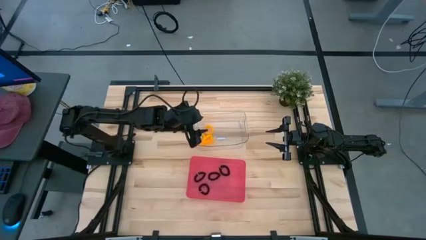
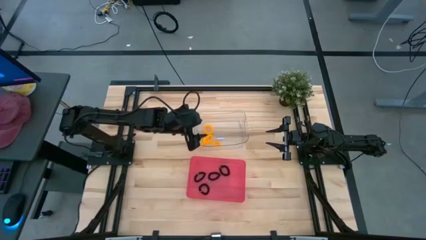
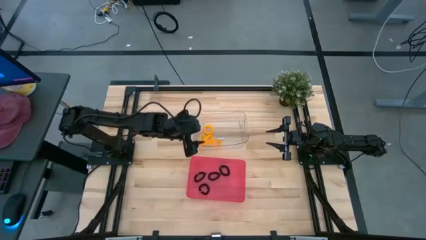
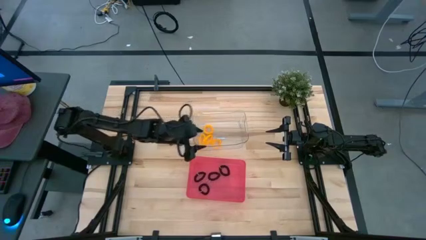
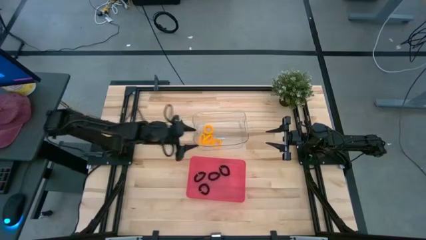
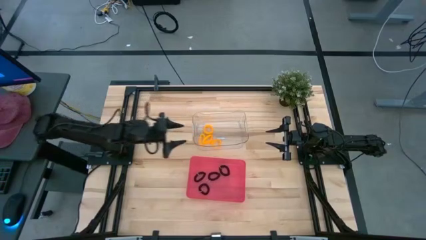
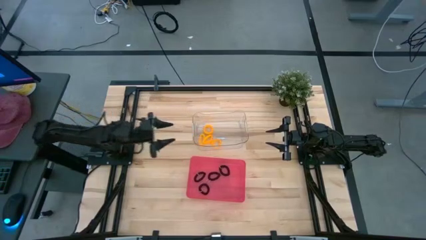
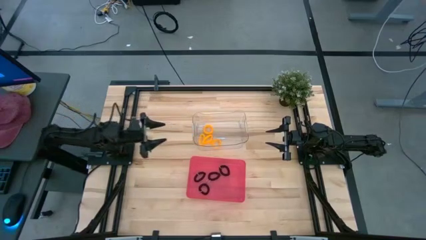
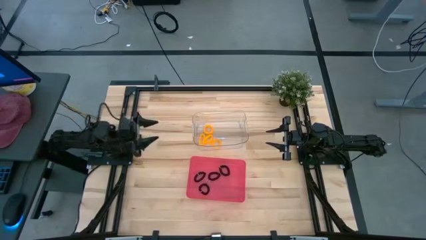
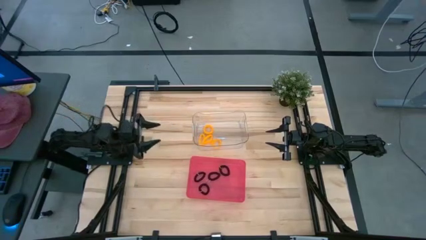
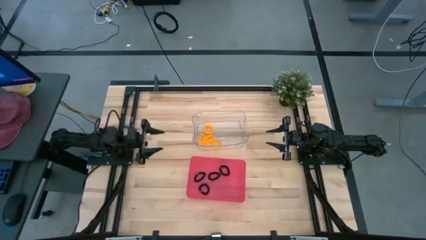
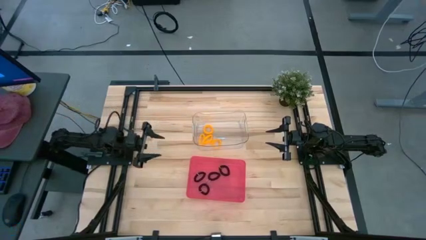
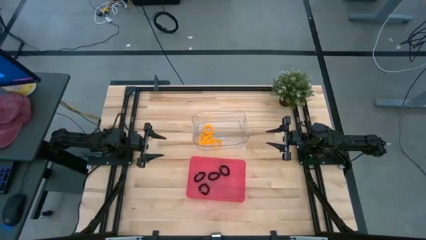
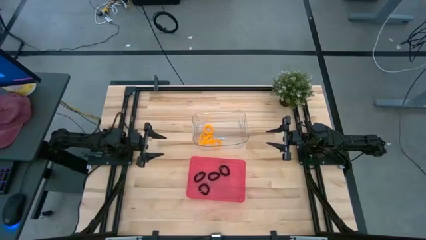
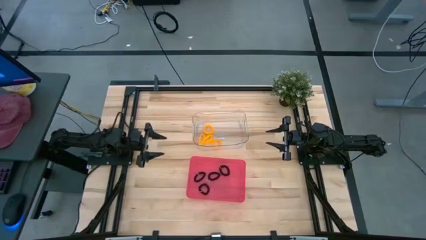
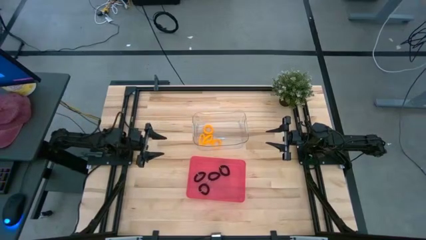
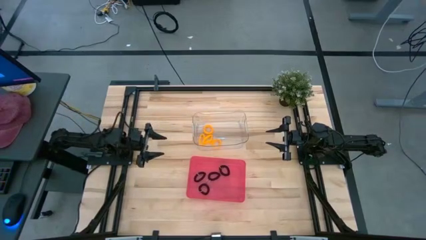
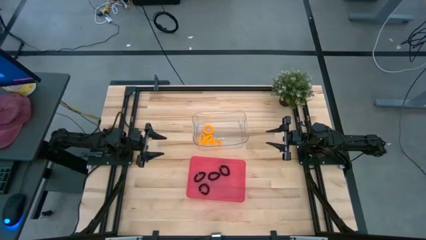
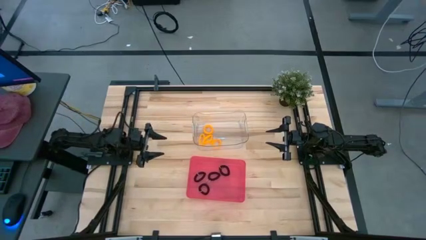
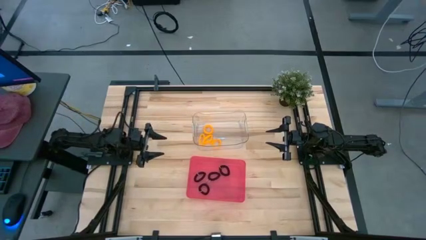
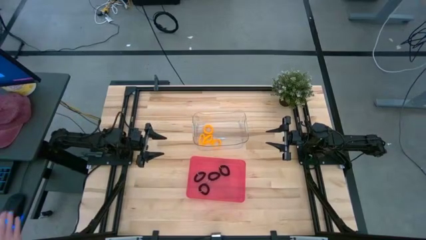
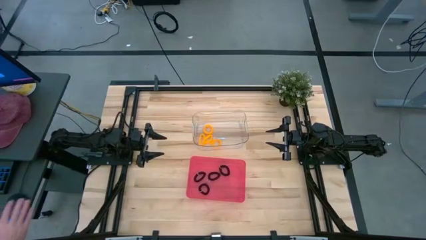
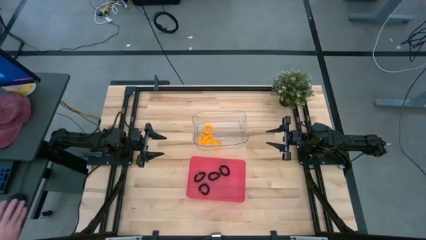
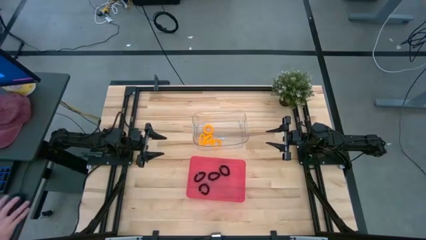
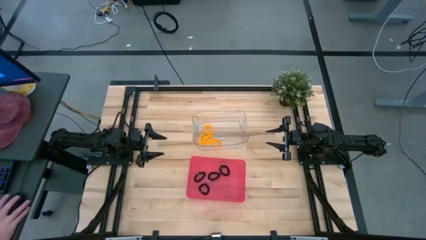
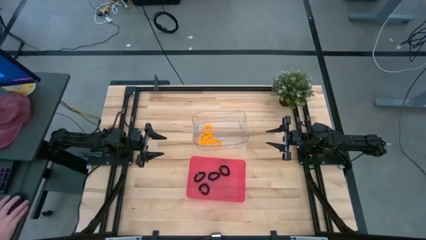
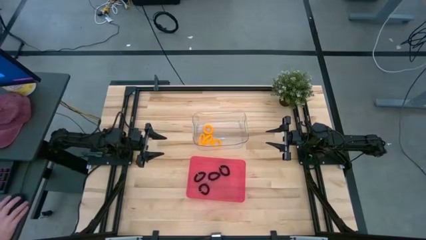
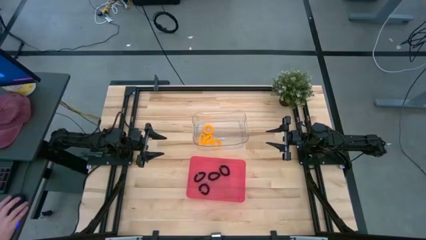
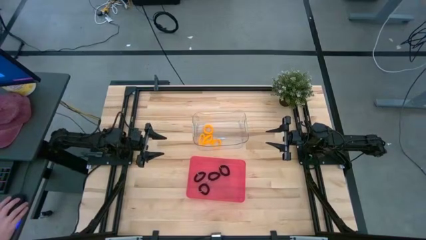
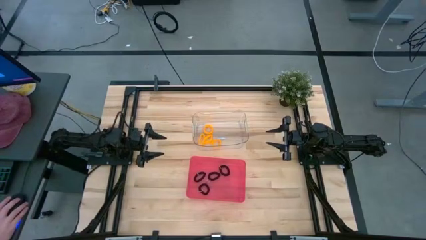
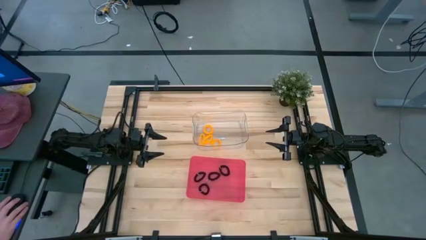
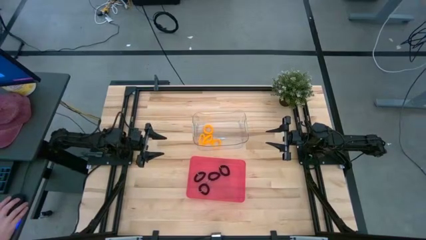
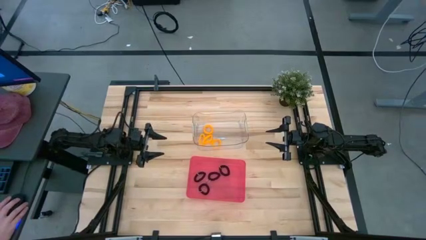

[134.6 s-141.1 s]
Task: Sort spring keychains
Return to Home Position

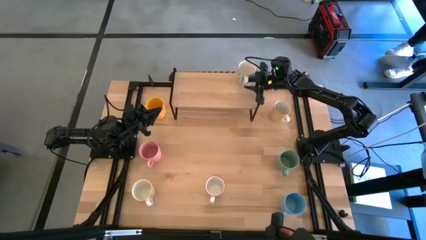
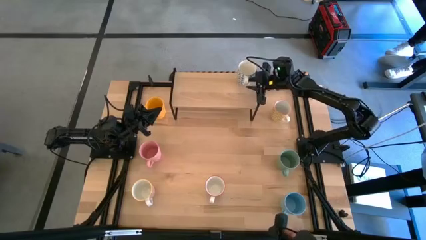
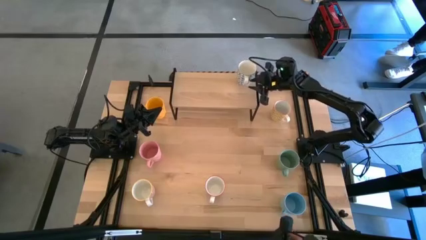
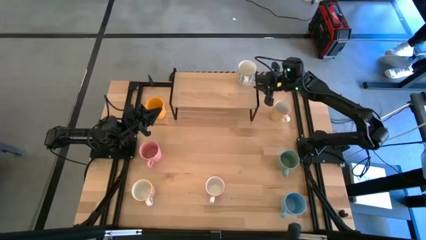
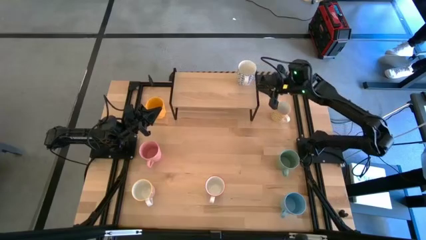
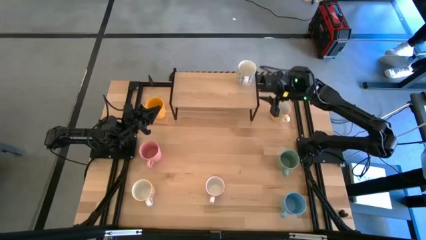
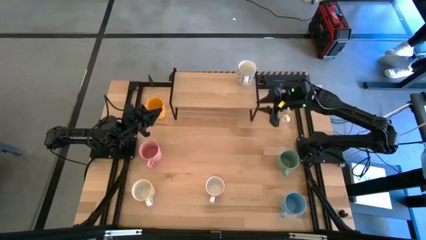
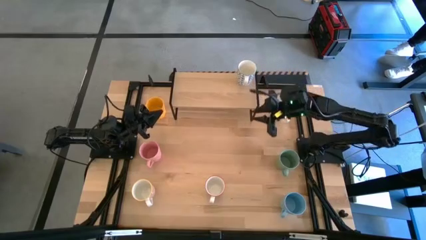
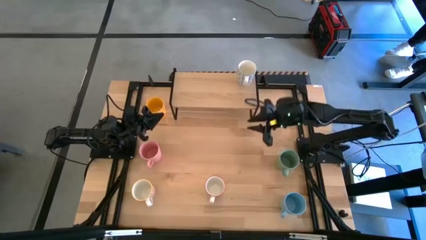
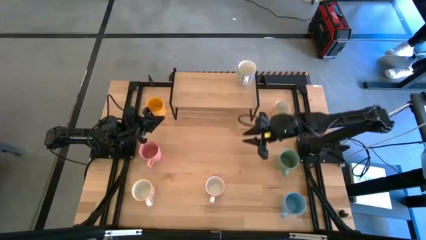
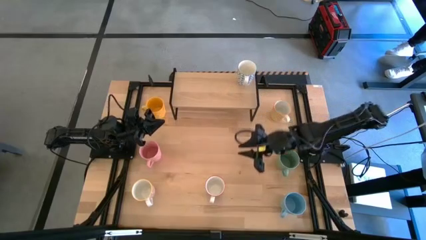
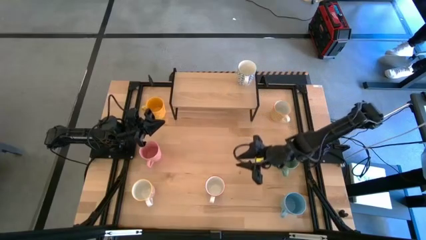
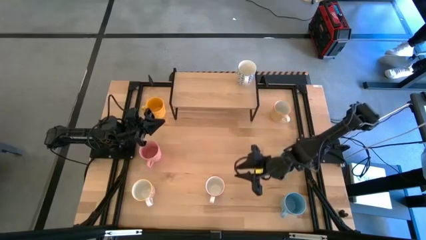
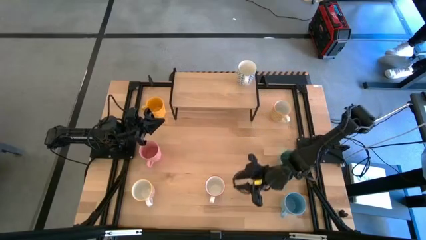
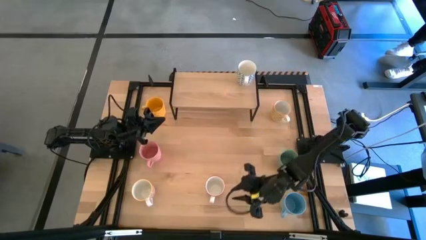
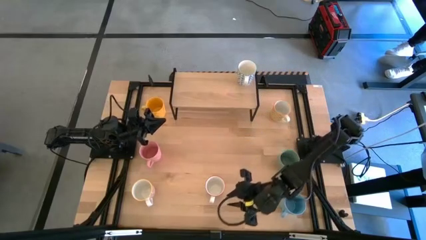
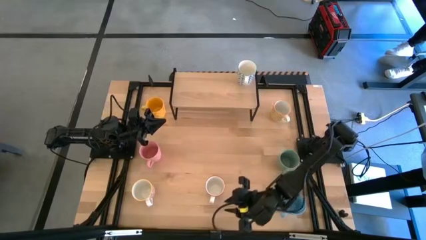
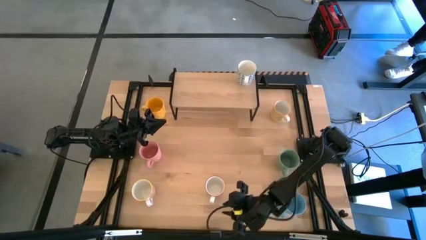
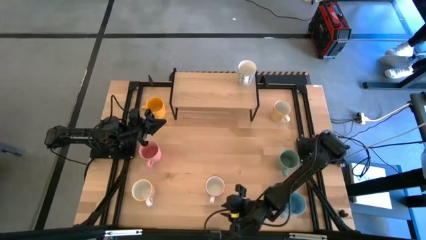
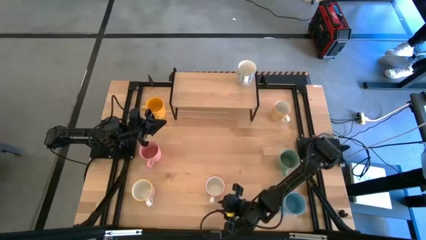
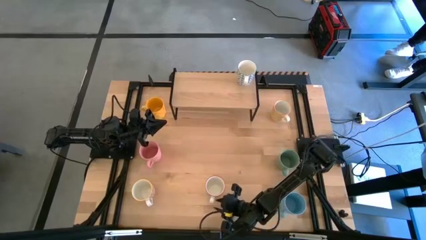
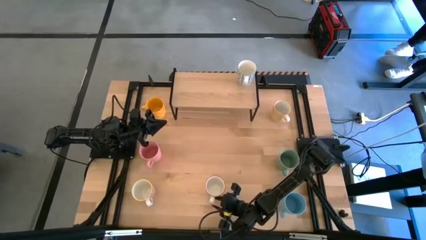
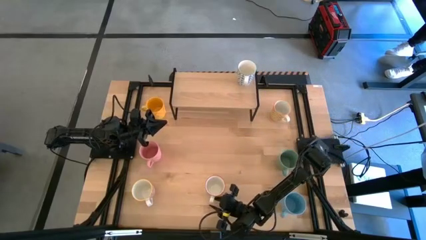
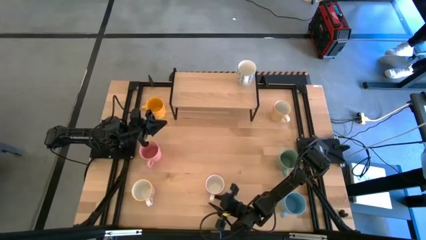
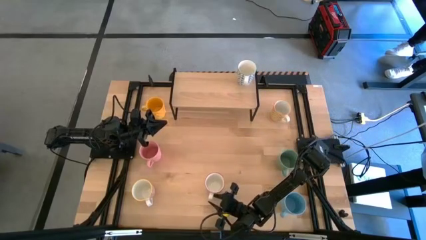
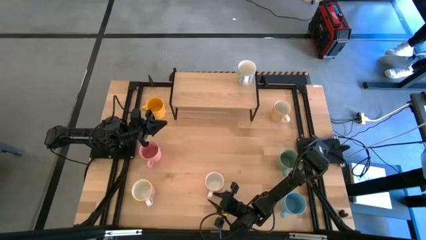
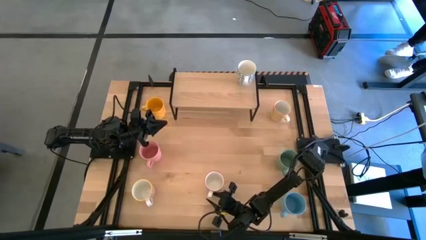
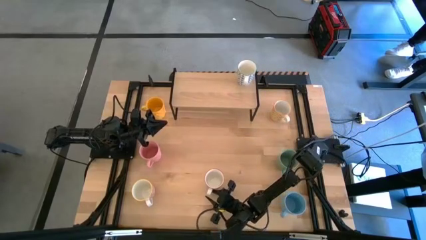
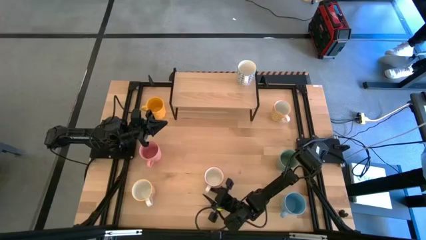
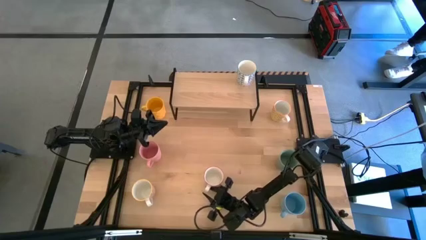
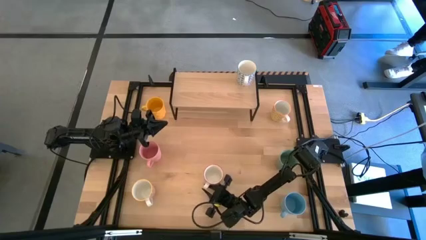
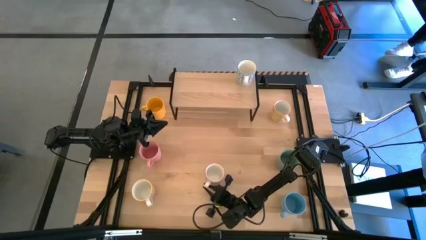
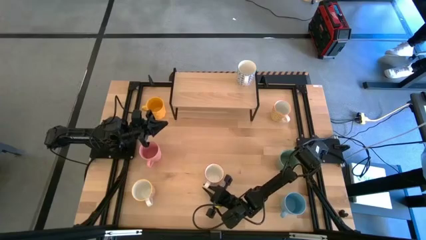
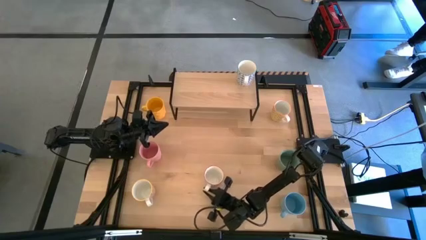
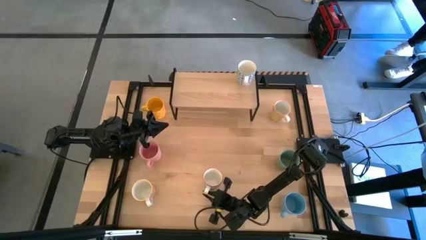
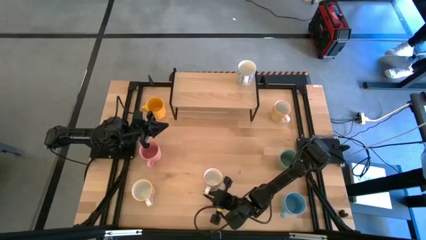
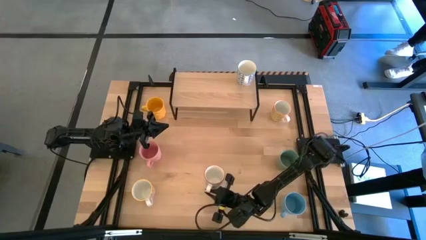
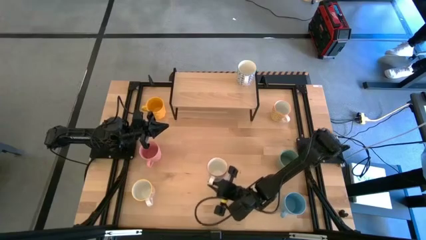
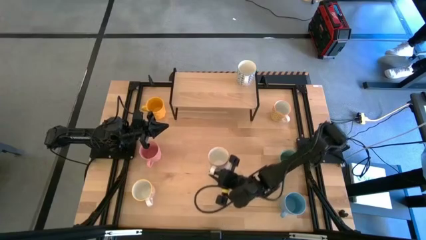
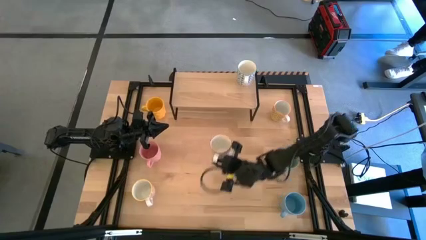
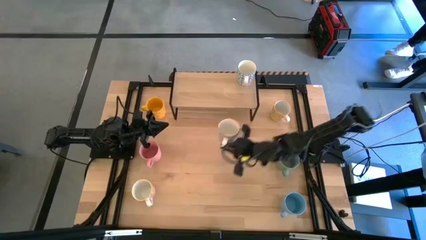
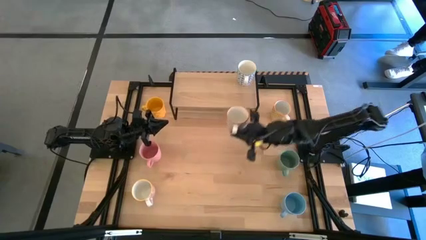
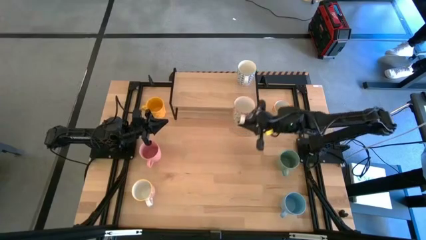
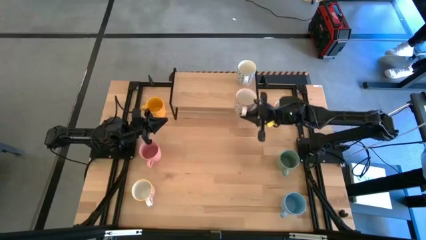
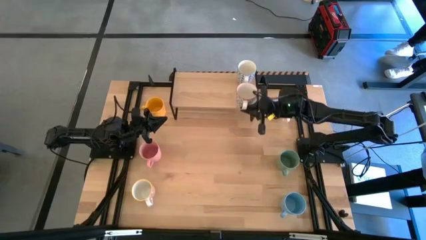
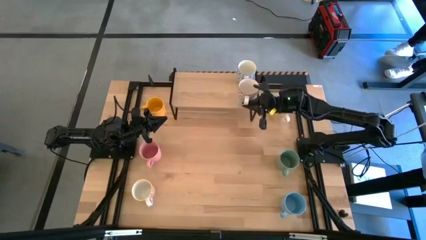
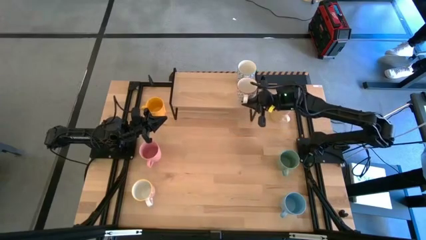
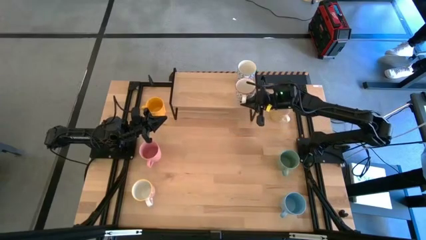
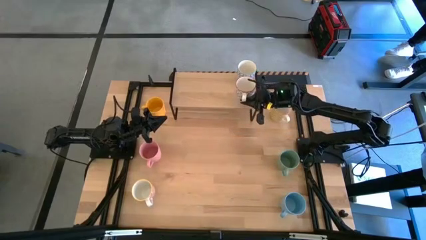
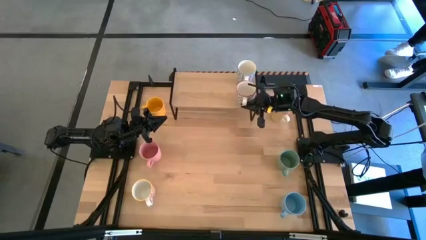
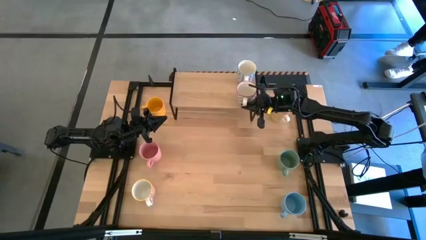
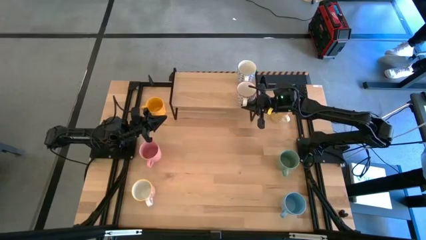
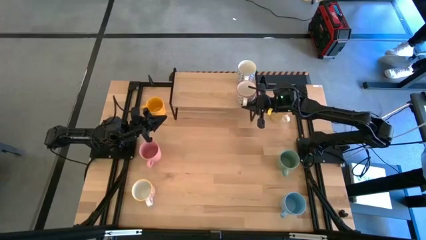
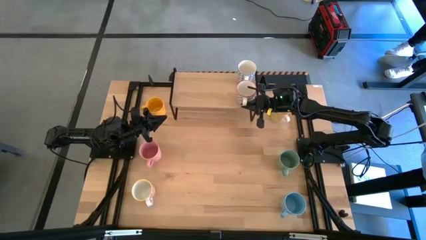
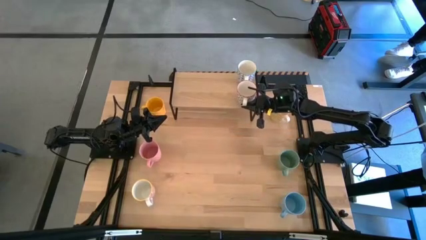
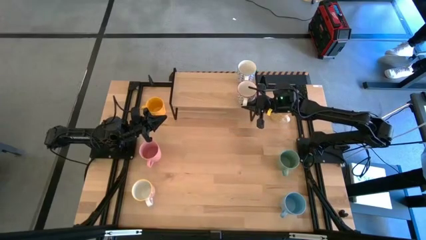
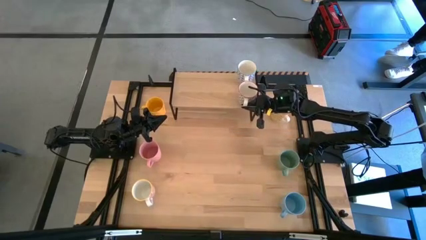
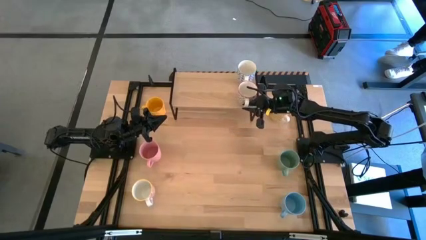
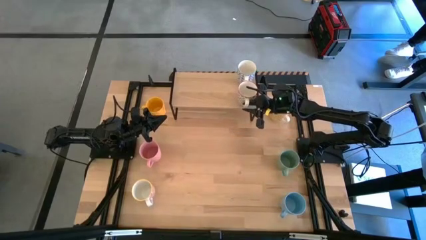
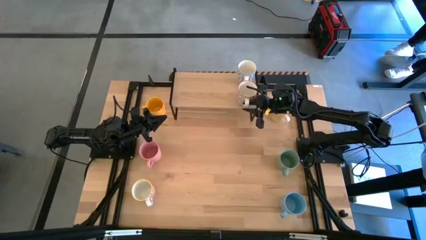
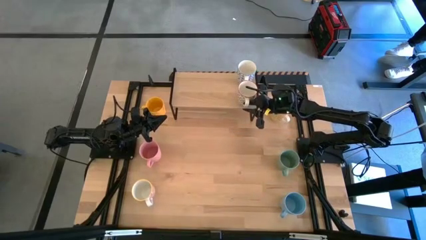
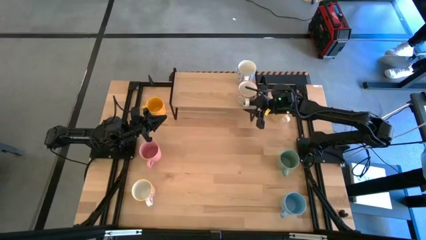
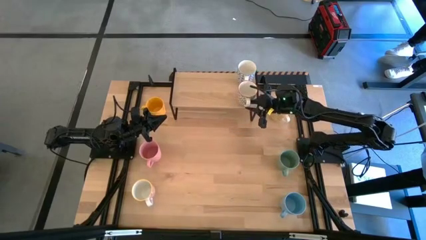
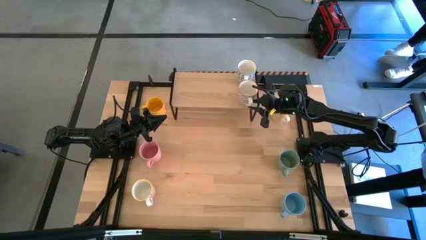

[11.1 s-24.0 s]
Task: Place coffee mugs
Put the gray patterned mug on the shelf
